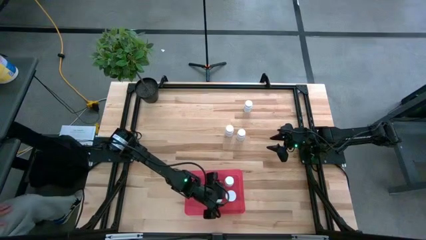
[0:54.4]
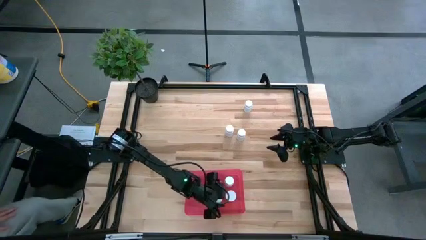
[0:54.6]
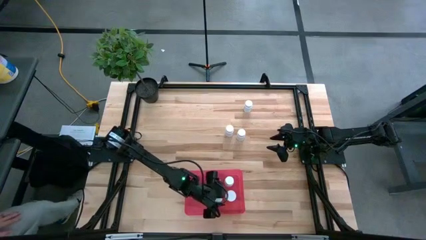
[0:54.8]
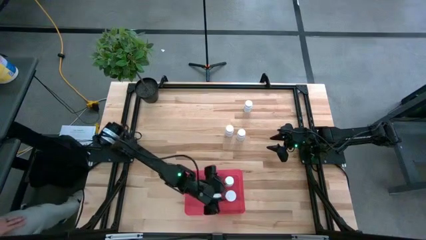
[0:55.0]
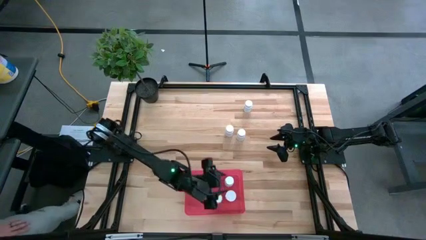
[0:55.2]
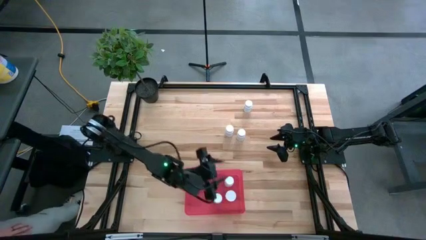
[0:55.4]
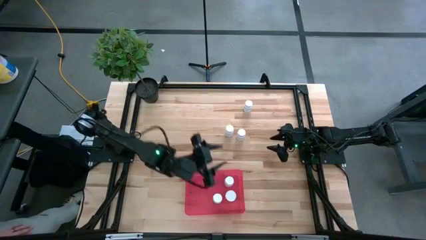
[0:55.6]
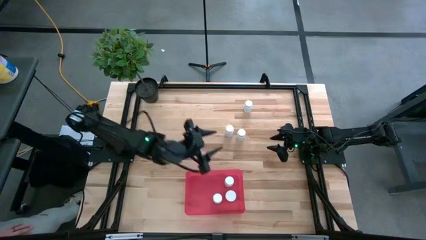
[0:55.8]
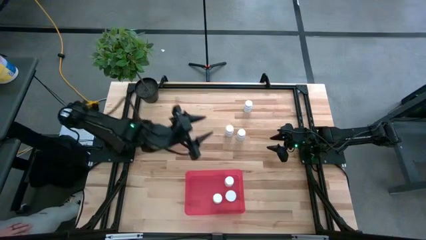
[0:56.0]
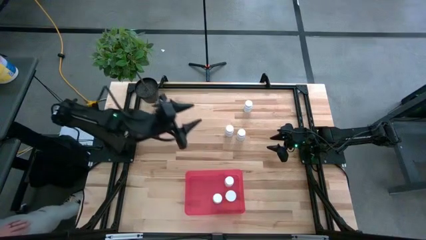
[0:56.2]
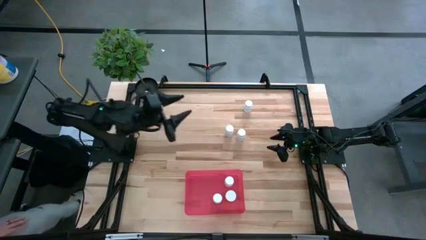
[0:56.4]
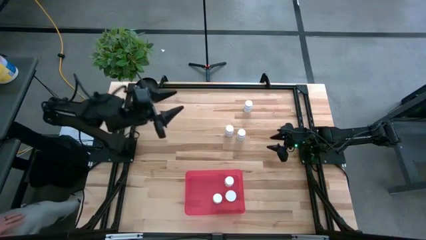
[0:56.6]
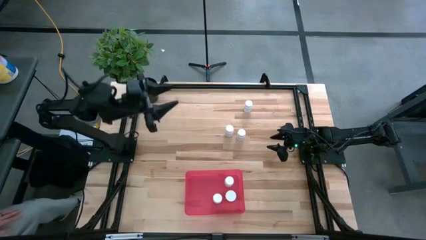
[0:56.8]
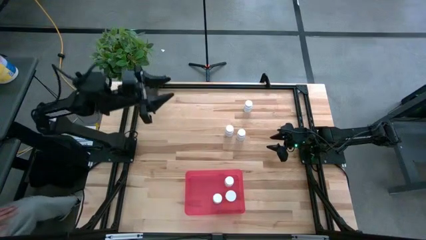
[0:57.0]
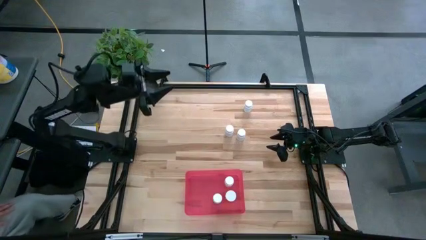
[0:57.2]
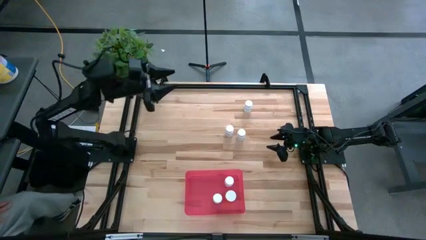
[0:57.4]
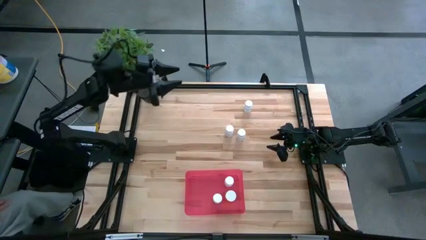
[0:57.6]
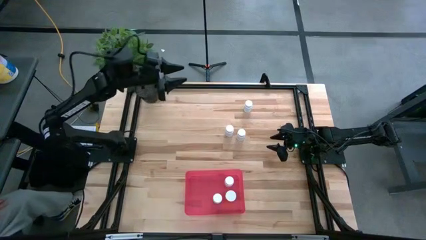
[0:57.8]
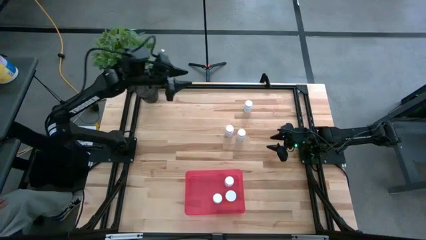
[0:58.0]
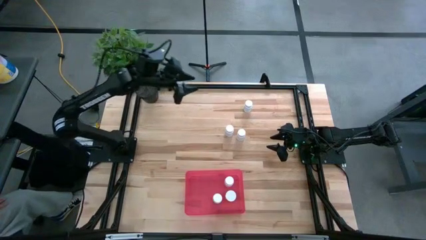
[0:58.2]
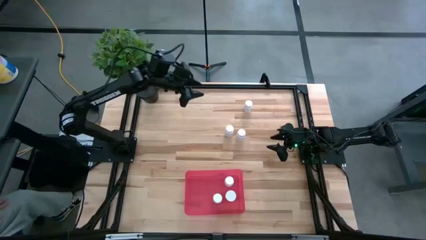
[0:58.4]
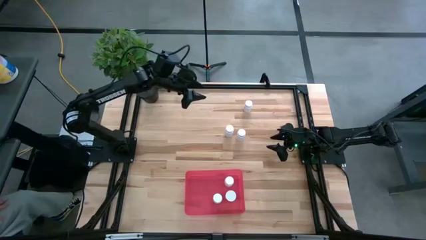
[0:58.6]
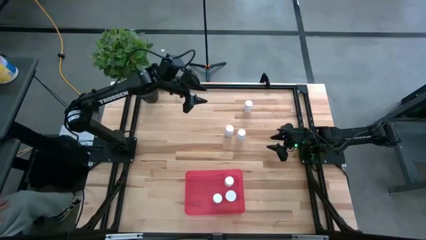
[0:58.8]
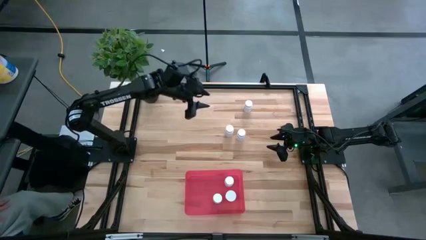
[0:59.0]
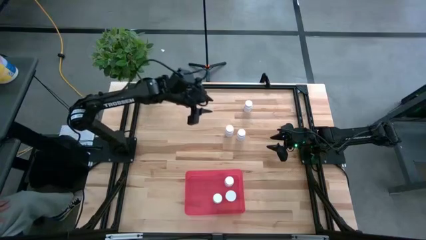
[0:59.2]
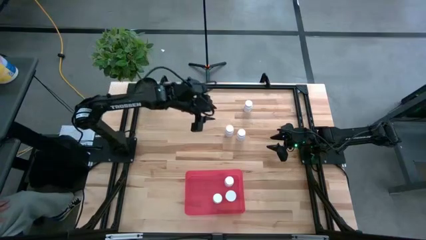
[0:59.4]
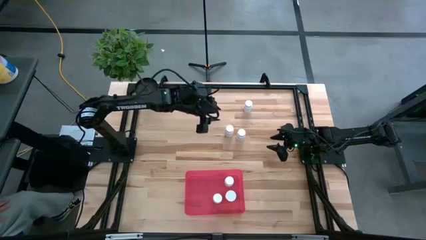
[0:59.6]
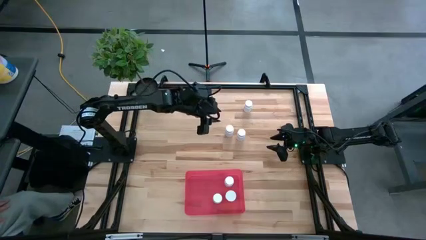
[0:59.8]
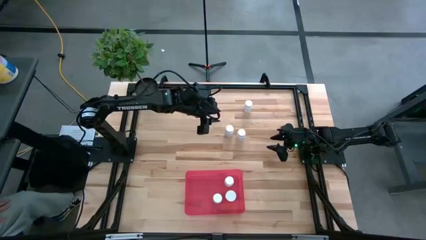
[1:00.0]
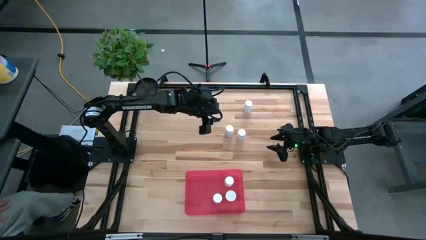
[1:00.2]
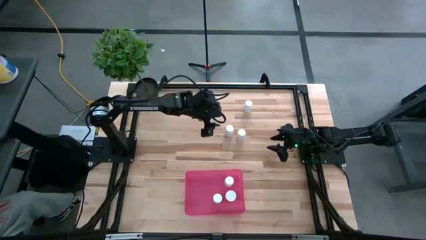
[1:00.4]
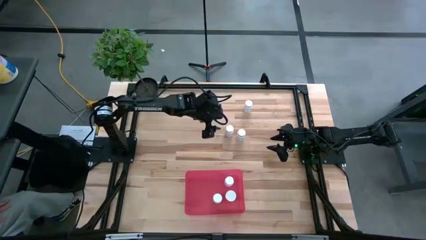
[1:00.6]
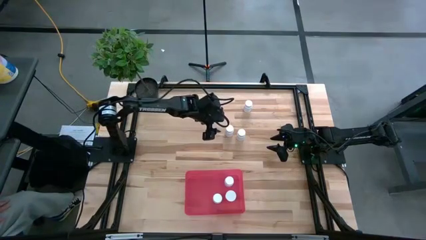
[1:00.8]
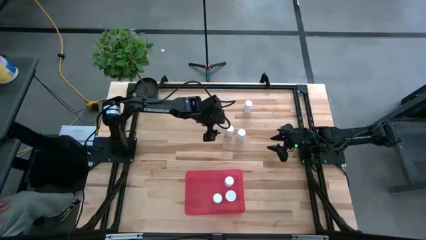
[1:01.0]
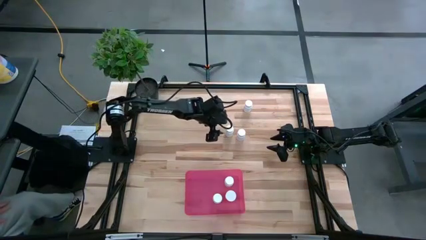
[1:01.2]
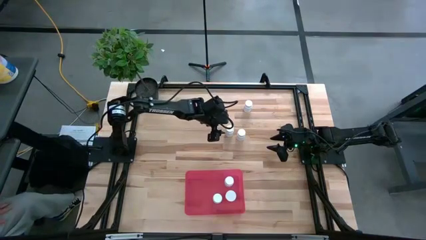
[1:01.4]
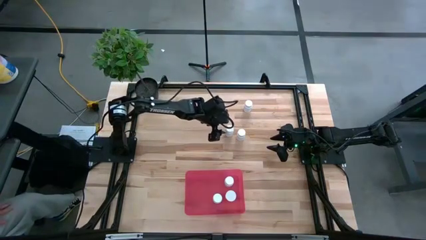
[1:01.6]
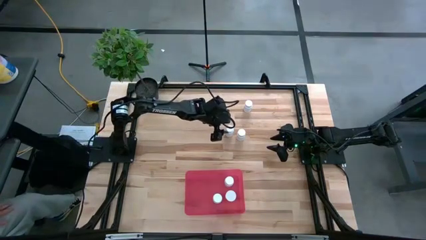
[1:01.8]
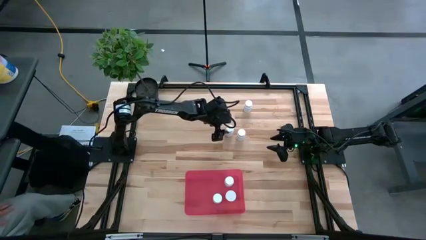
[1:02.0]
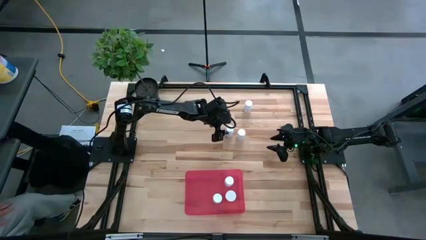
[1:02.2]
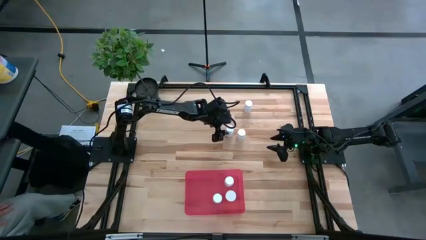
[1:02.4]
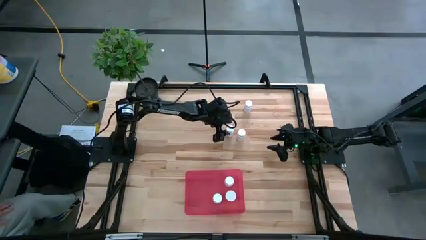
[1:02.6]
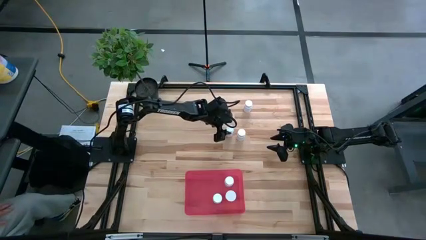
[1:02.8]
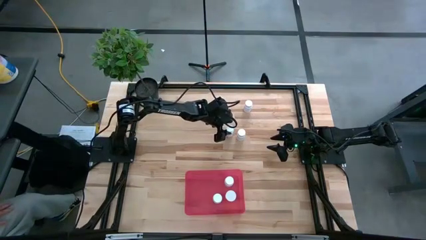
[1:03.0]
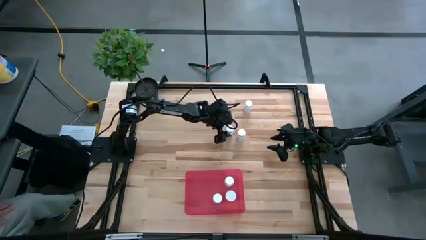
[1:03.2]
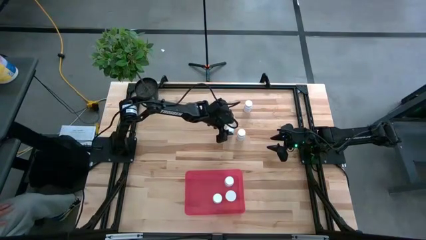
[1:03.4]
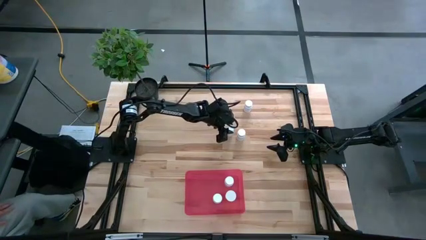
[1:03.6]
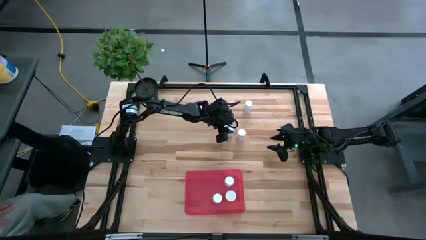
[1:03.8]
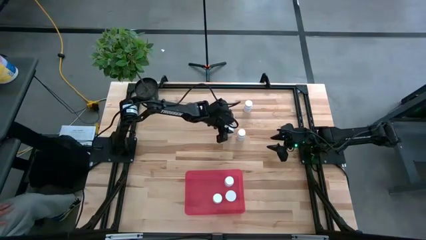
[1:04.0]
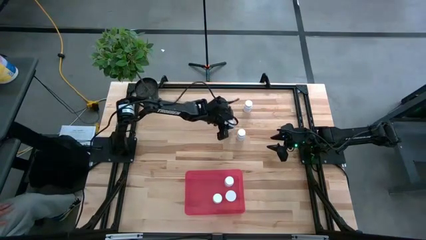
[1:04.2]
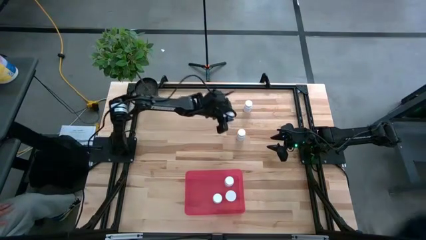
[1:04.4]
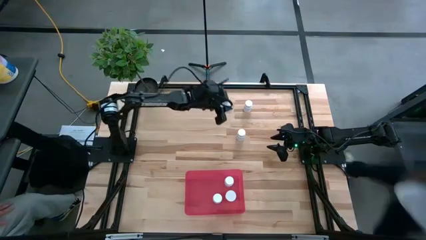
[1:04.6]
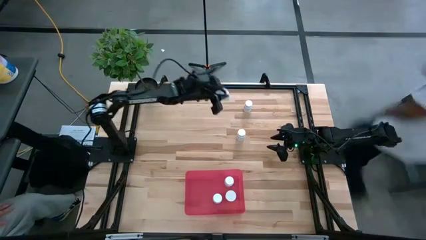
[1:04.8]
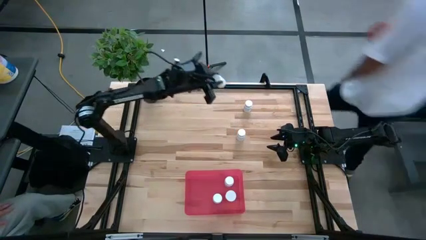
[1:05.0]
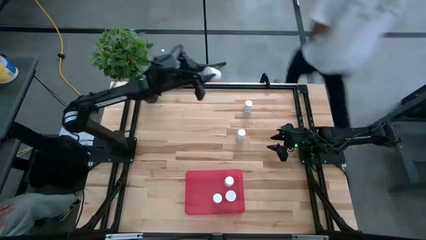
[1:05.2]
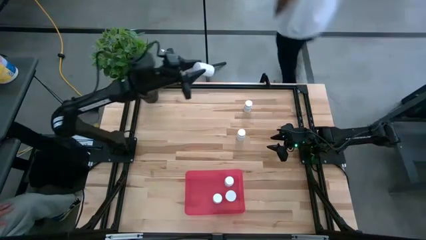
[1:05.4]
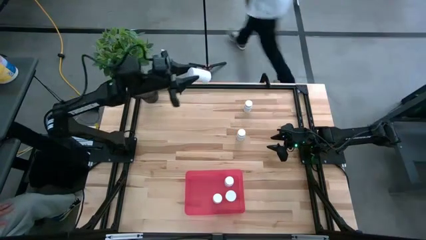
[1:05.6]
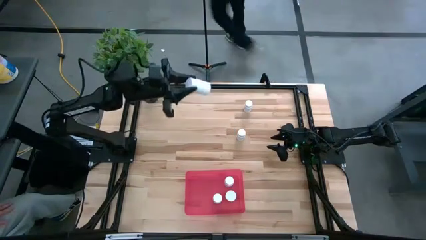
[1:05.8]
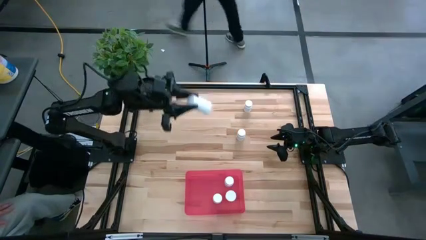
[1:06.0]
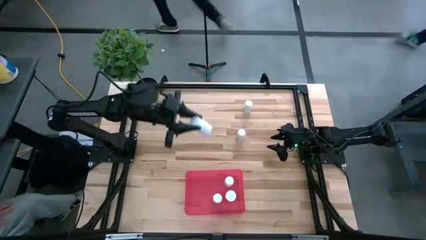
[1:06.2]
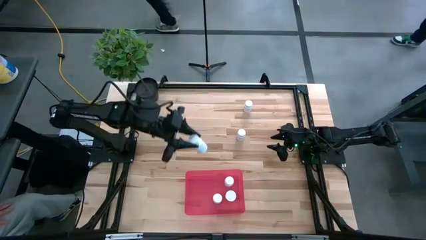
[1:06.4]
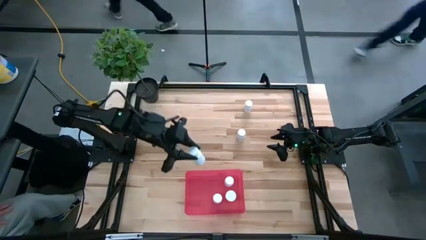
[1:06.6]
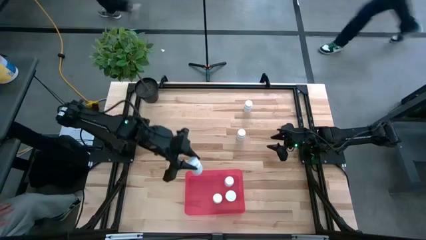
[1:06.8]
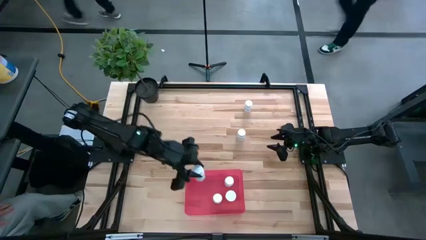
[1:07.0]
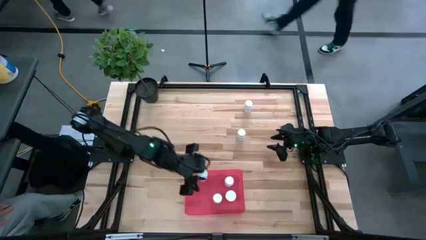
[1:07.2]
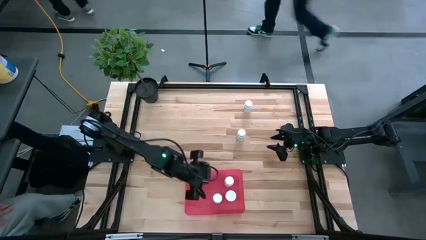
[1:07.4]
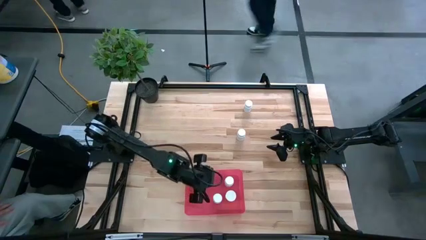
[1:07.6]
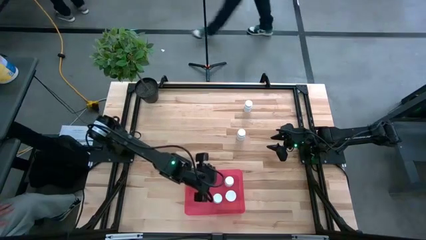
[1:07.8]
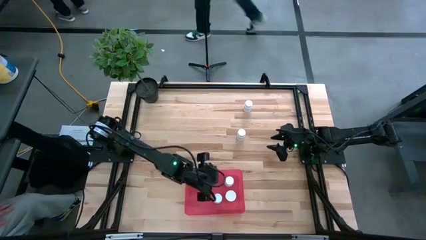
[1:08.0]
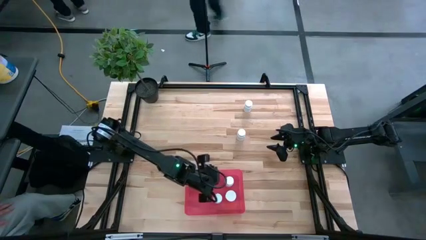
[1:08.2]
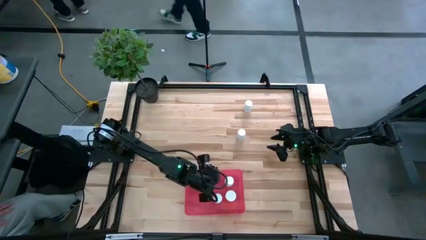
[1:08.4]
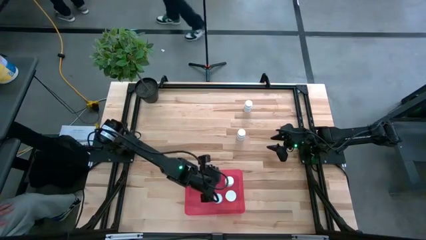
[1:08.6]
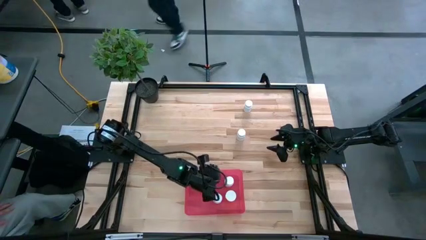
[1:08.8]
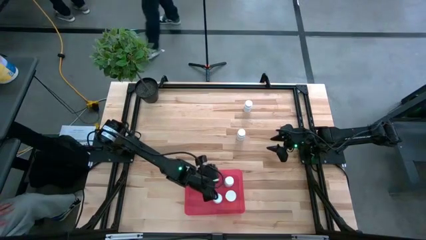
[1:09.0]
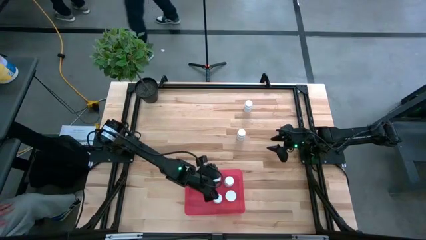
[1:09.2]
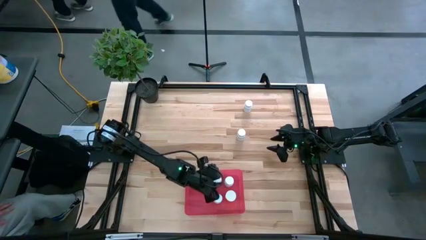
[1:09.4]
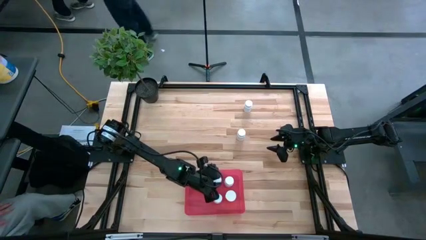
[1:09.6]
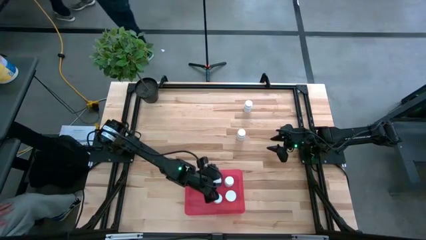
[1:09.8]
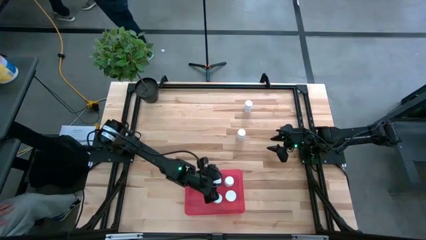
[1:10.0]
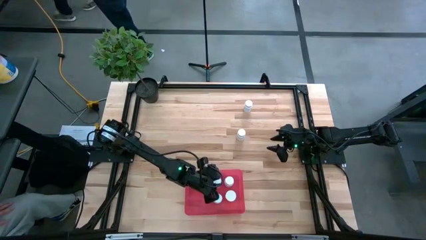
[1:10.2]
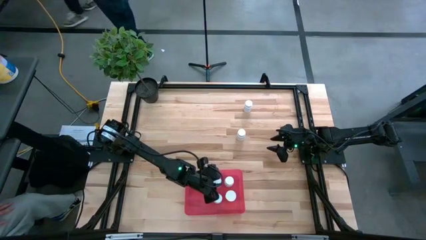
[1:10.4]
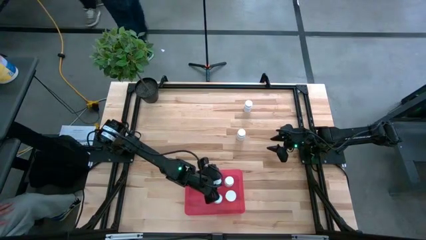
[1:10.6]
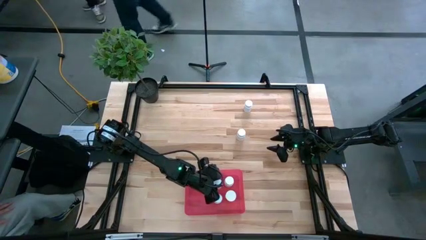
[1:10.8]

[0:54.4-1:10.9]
Task: Pick and place pill bottles into a basket
Put the white pill bottle into the pink bin
